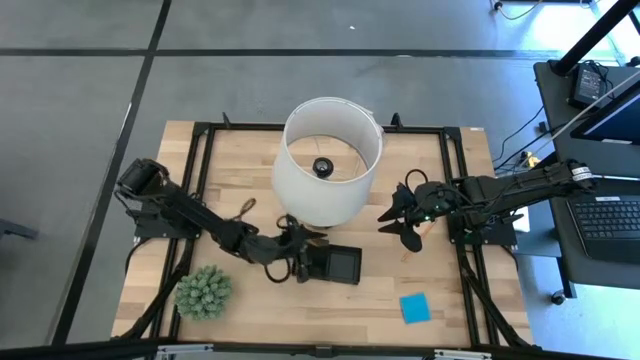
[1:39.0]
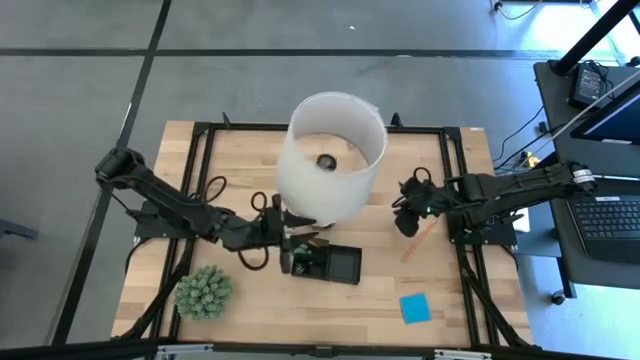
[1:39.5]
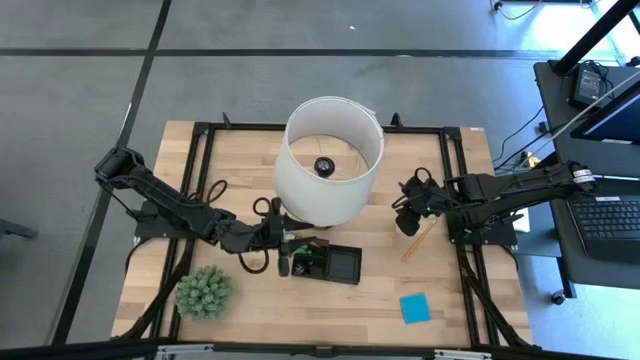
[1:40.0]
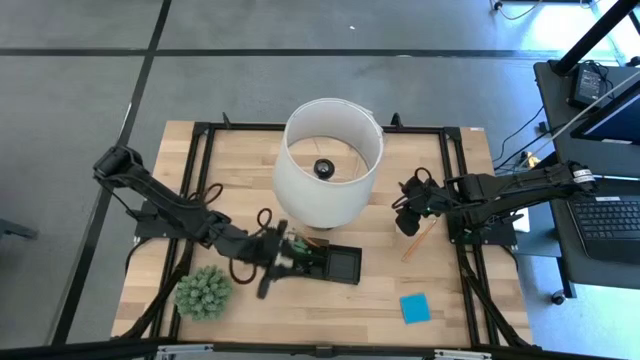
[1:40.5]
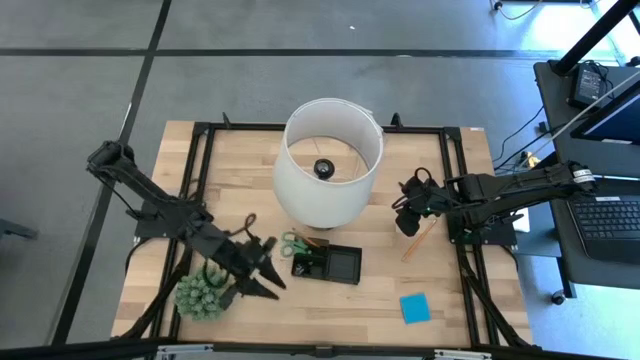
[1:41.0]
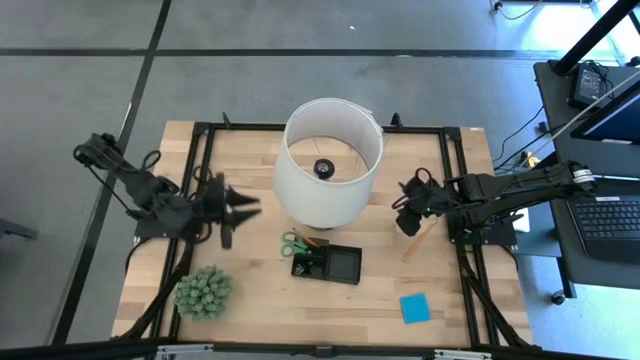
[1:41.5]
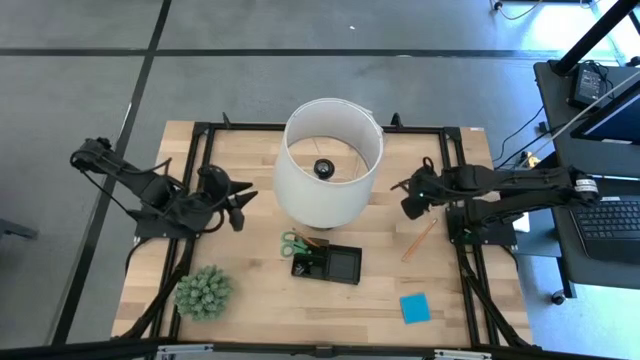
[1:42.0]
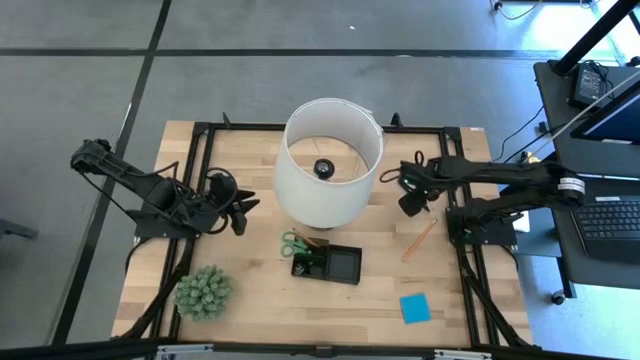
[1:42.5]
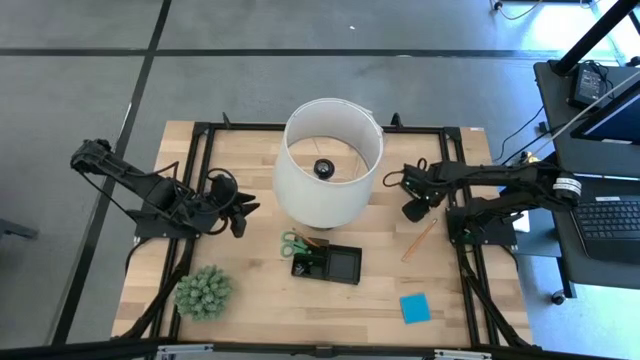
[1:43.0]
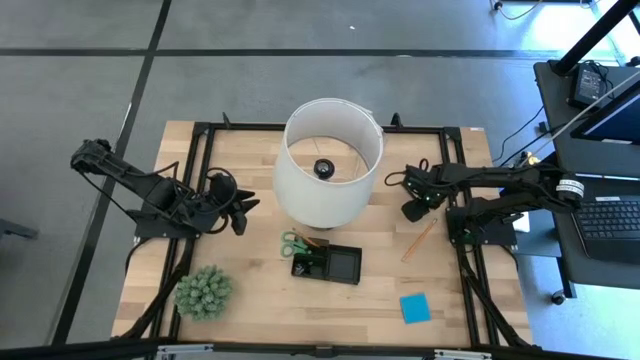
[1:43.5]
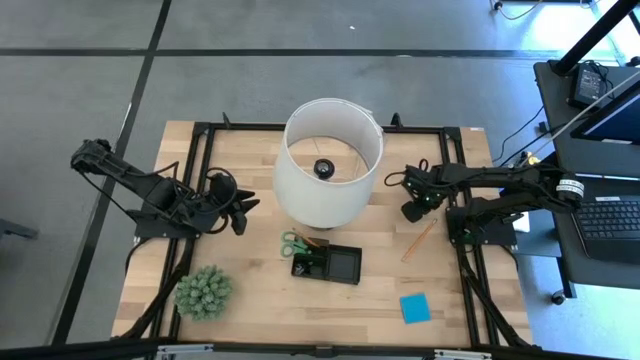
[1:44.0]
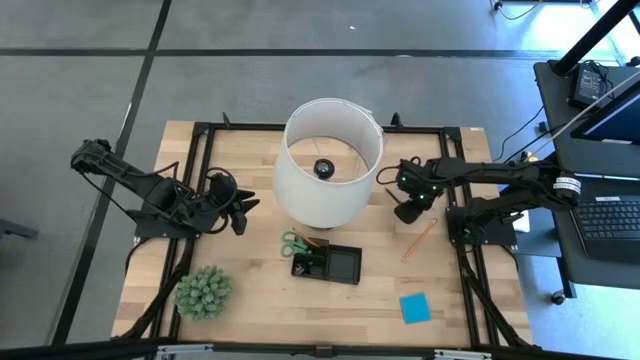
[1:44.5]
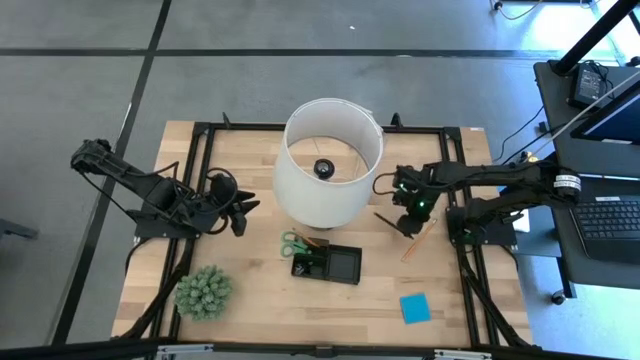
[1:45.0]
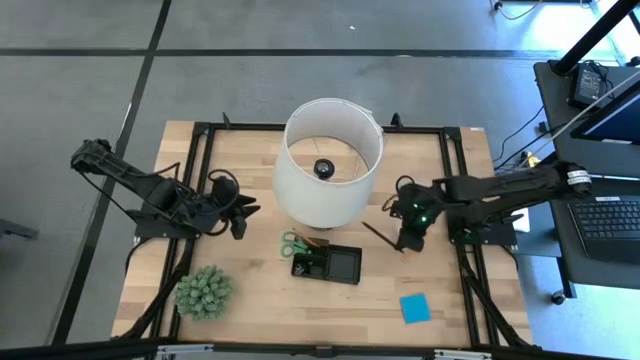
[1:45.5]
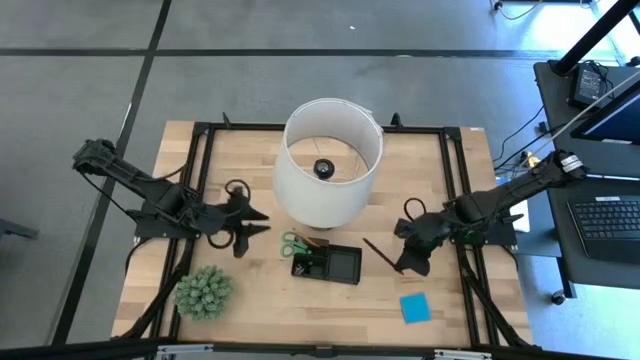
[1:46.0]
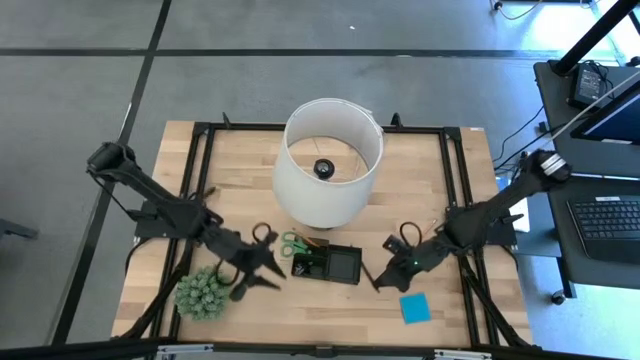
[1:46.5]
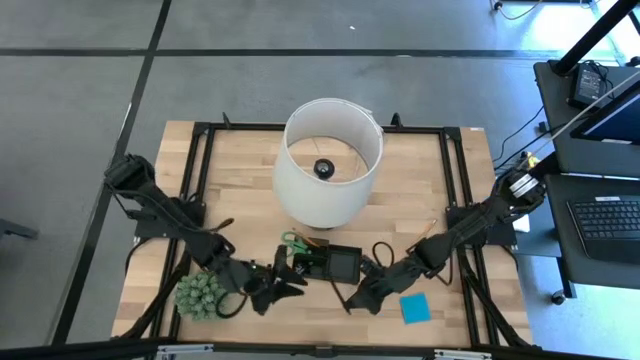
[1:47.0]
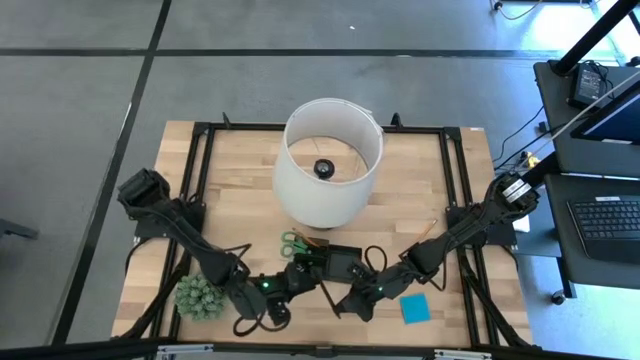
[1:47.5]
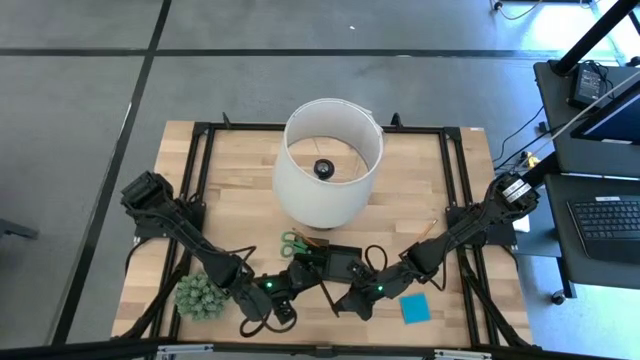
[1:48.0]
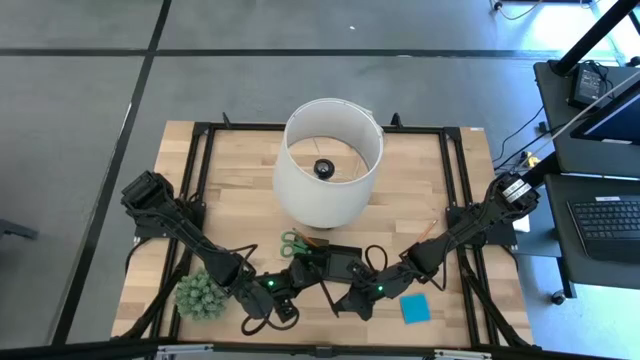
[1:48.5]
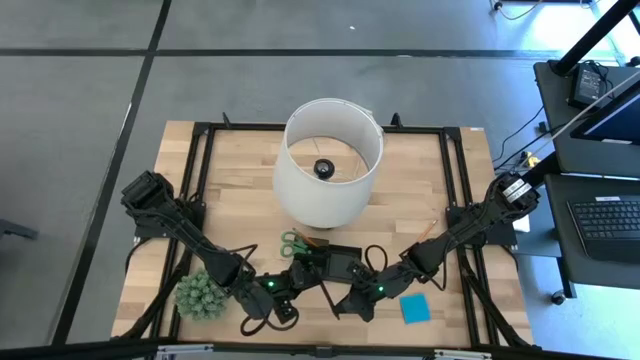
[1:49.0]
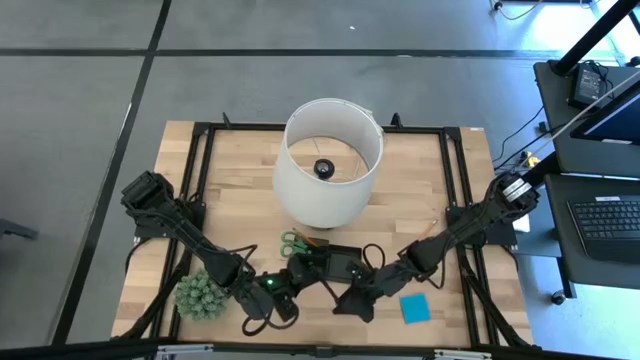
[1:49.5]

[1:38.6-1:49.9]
Task: Pick and place office supplies into organizer
Put the black pen into the black desk organizer

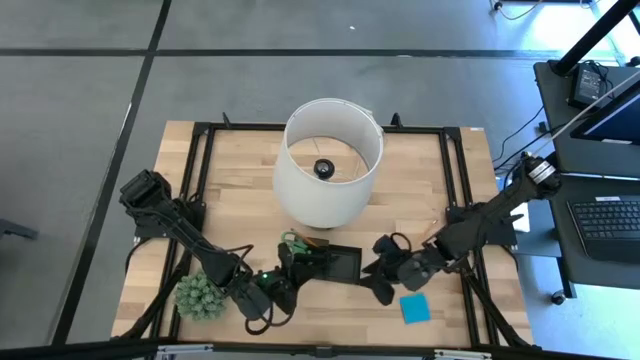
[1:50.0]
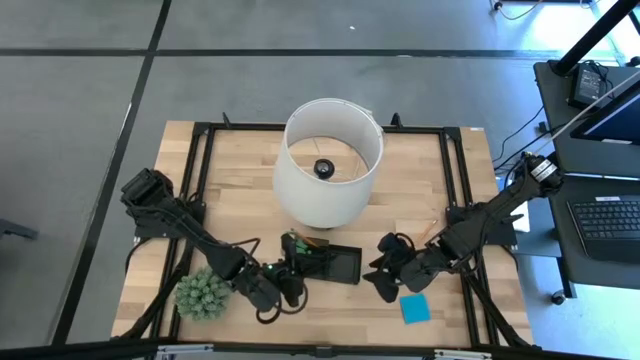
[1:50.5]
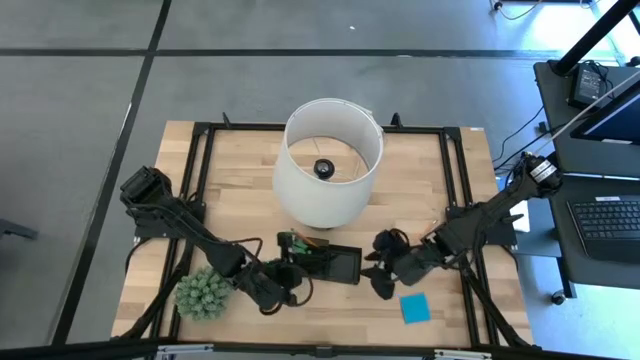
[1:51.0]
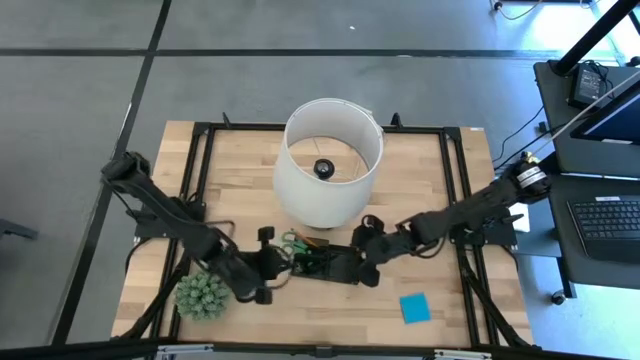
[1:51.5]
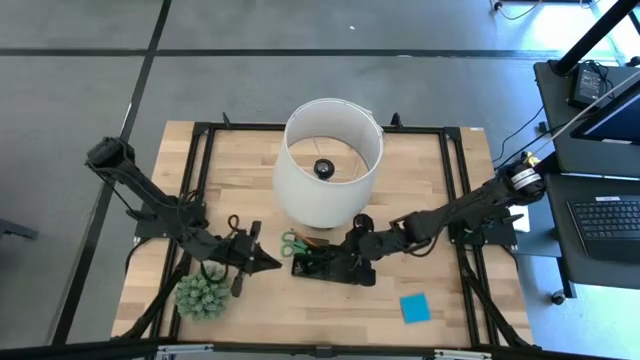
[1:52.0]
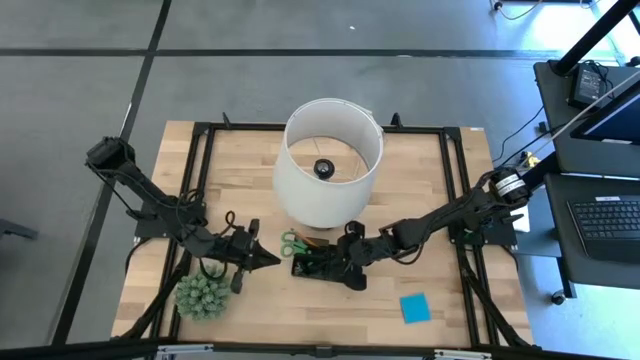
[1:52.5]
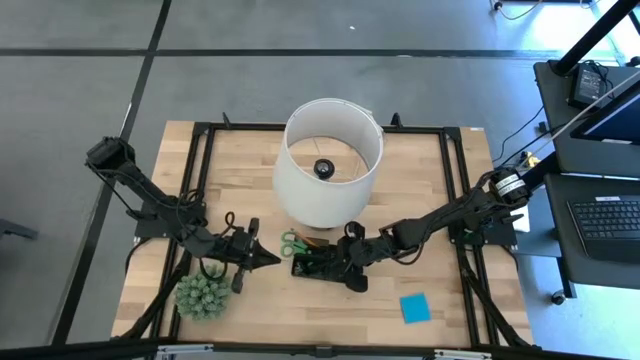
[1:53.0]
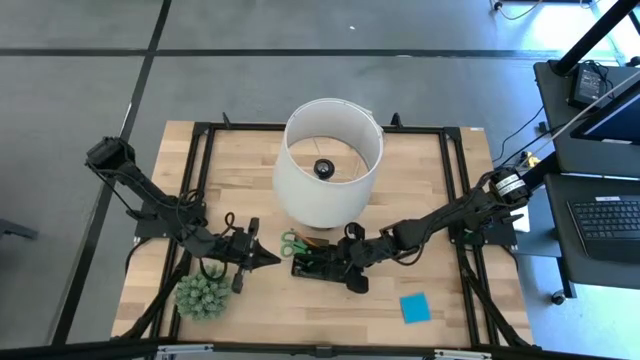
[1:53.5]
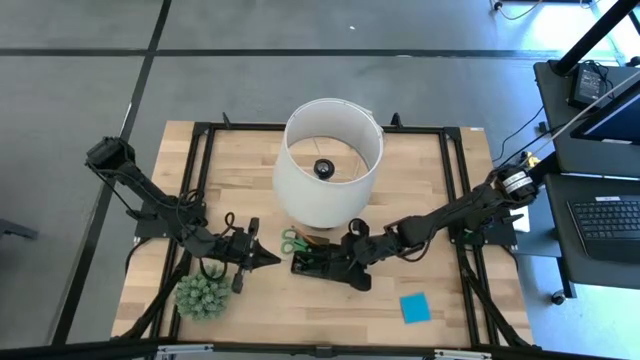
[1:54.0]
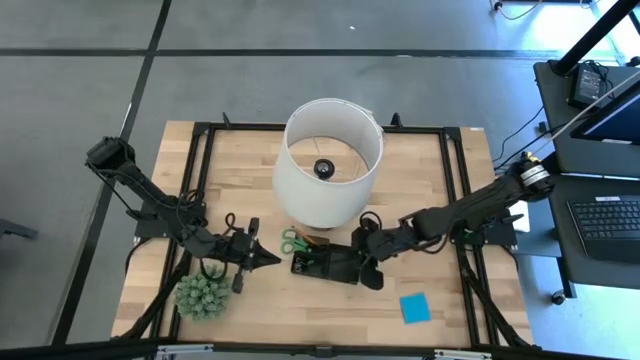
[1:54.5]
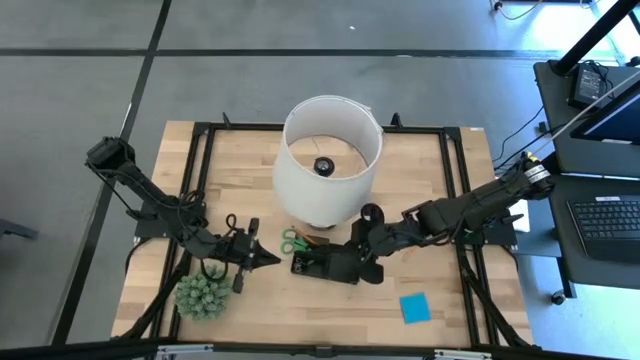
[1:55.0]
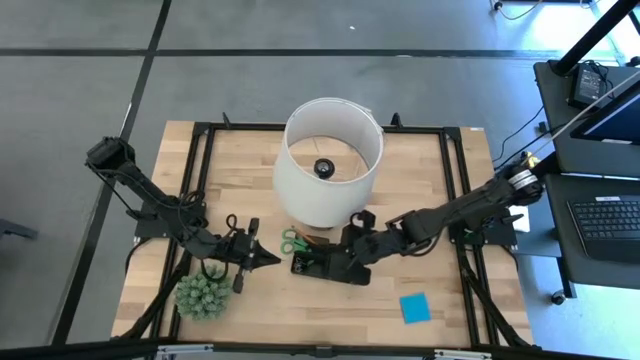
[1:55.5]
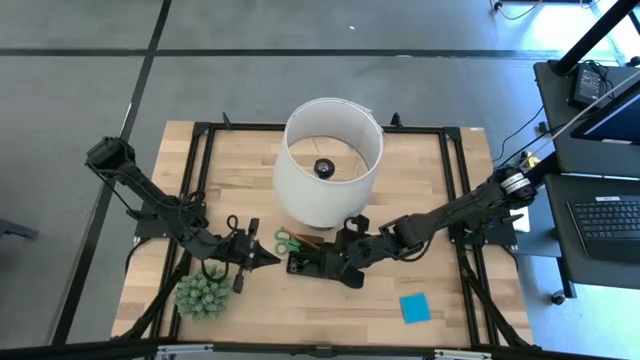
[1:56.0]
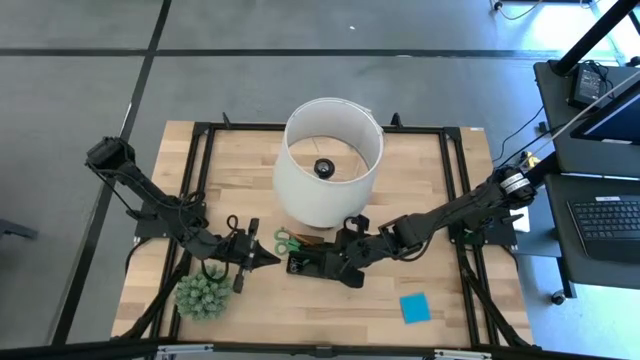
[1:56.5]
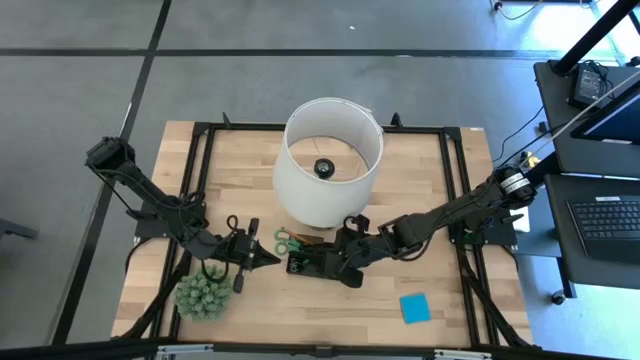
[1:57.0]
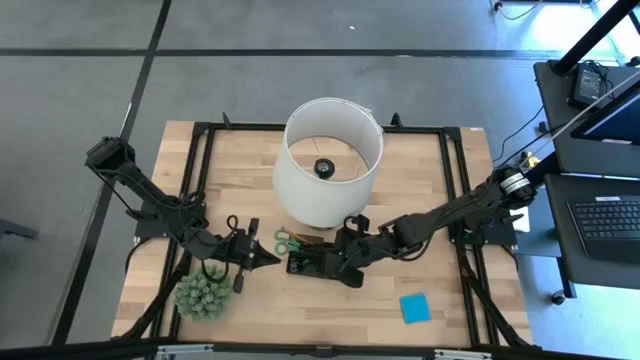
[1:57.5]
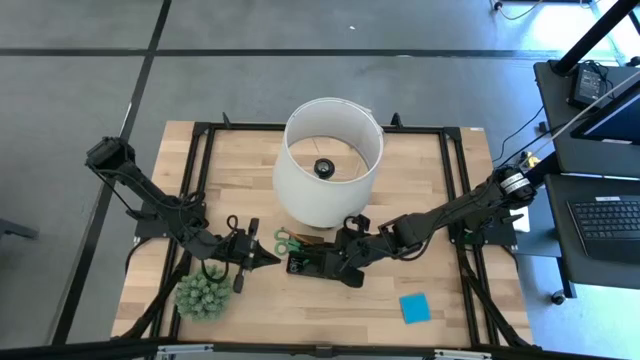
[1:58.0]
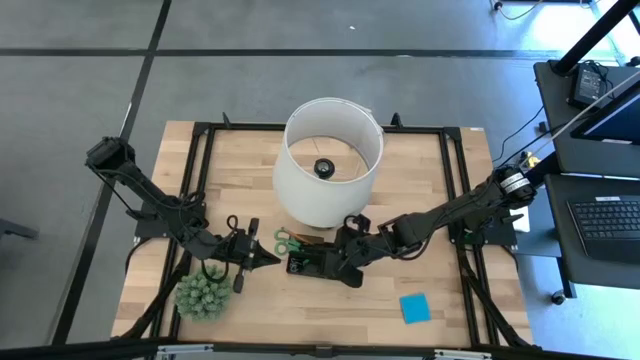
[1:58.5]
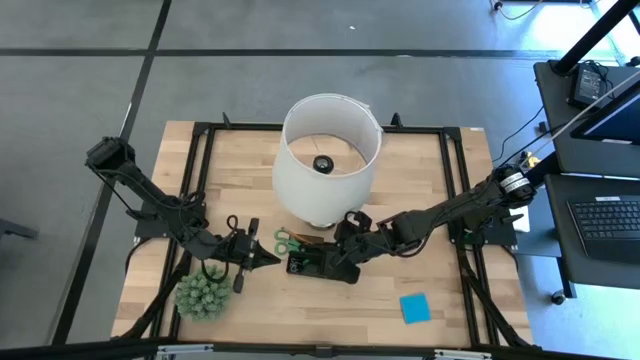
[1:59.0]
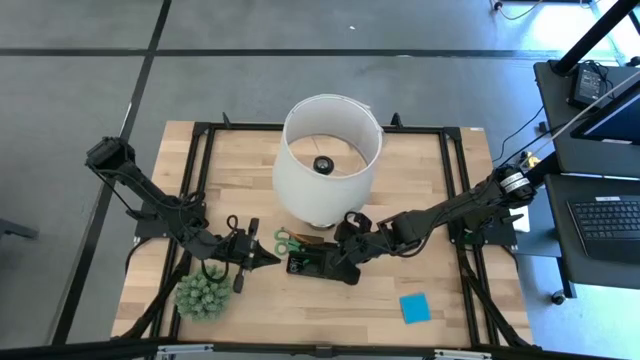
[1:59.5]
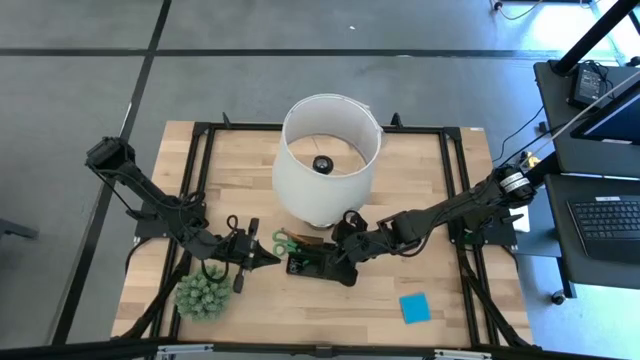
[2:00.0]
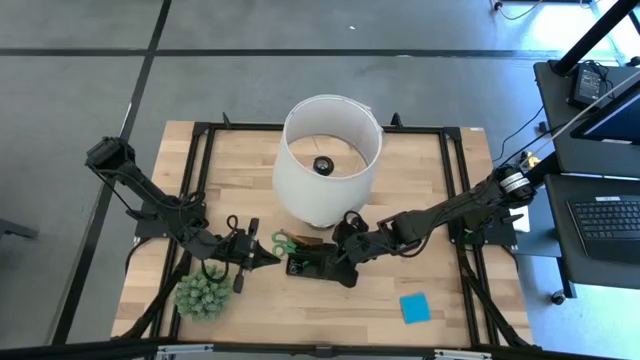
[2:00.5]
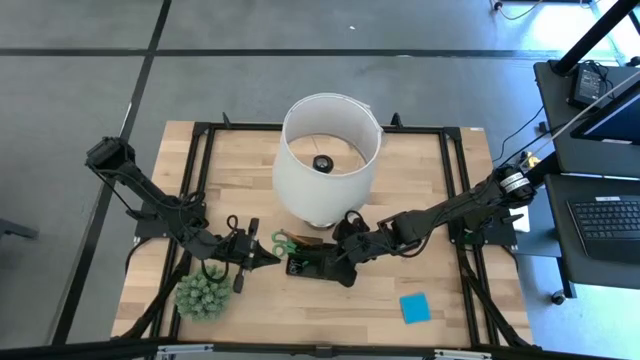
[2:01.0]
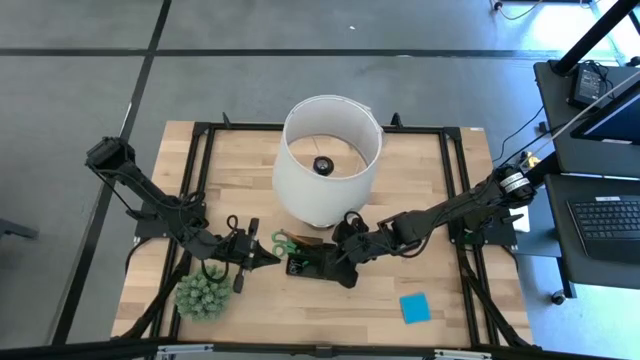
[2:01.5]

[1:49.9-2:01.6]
Put the black pen into the black desk organizer
